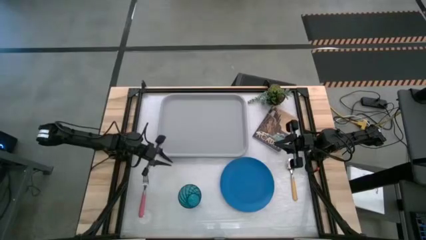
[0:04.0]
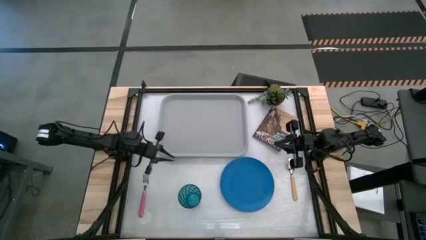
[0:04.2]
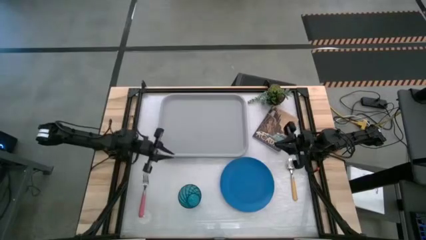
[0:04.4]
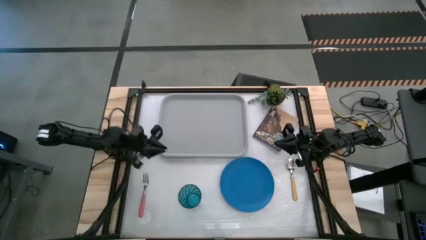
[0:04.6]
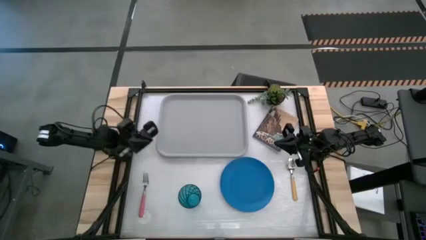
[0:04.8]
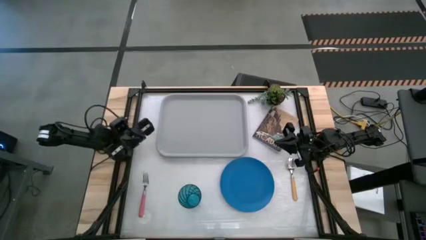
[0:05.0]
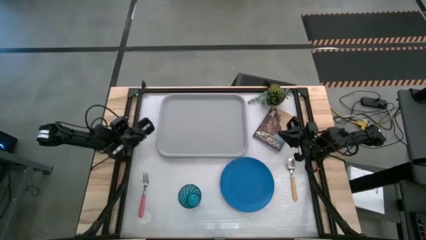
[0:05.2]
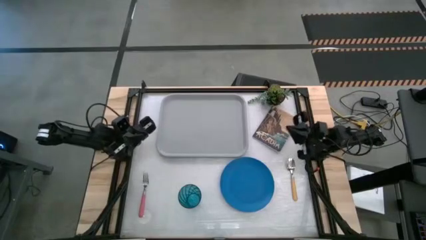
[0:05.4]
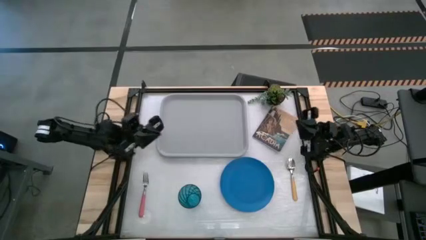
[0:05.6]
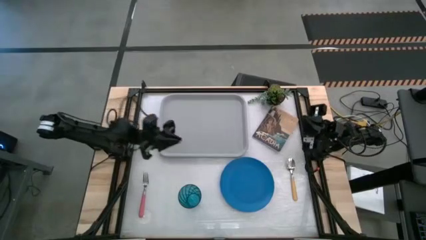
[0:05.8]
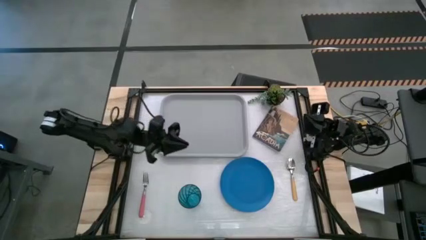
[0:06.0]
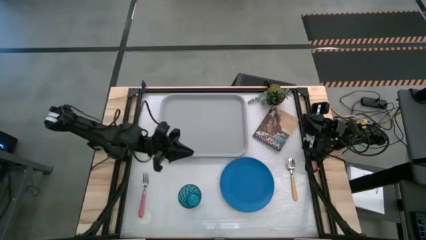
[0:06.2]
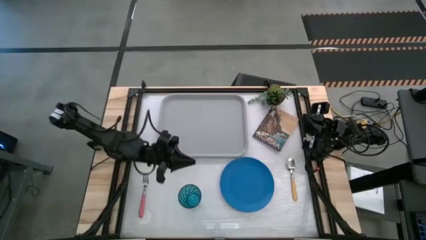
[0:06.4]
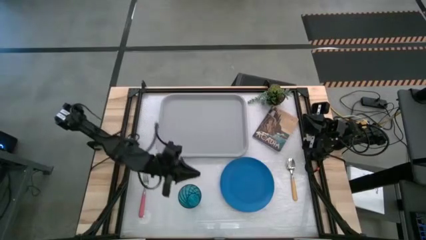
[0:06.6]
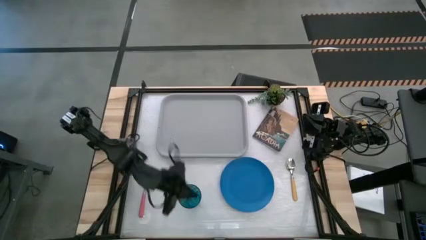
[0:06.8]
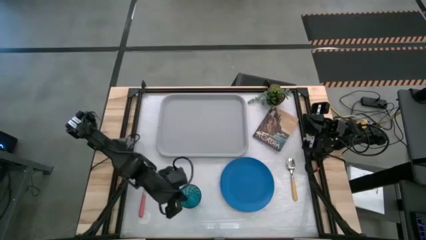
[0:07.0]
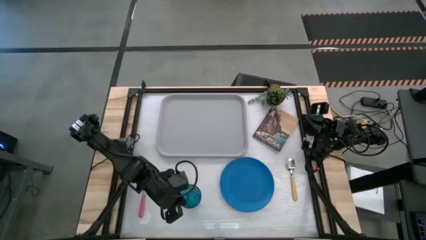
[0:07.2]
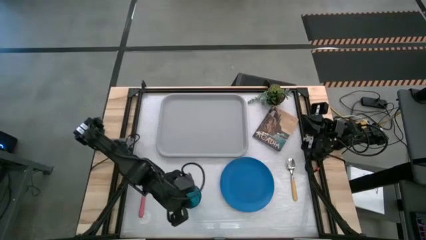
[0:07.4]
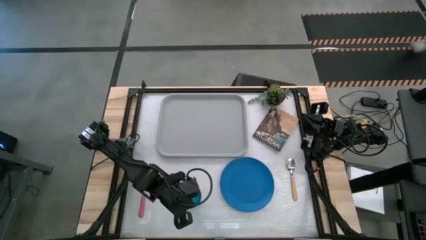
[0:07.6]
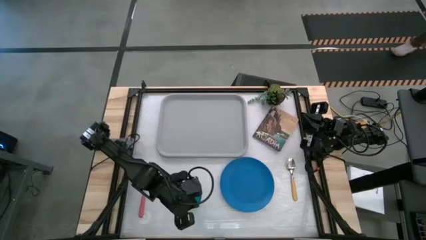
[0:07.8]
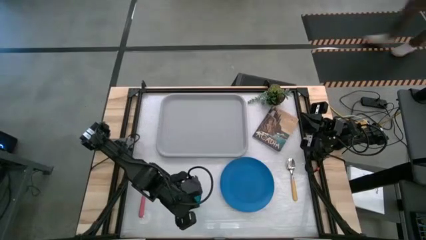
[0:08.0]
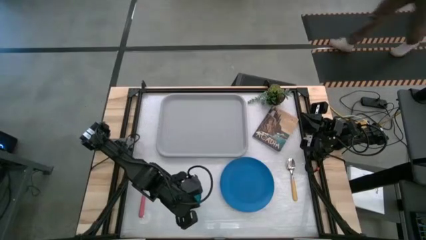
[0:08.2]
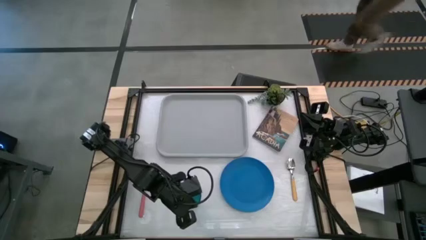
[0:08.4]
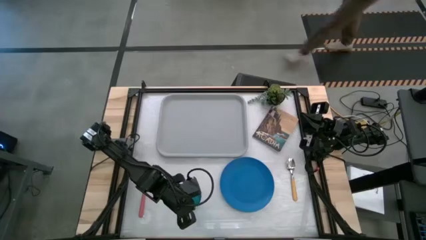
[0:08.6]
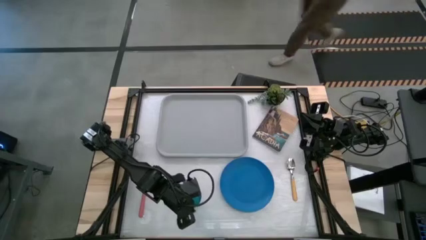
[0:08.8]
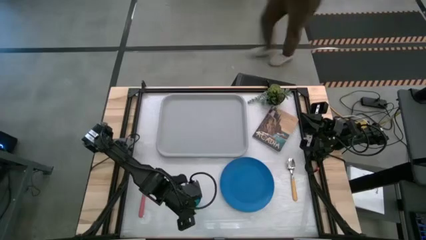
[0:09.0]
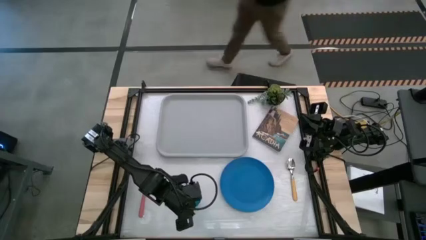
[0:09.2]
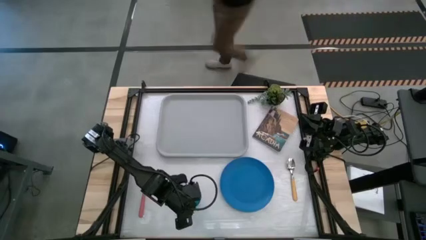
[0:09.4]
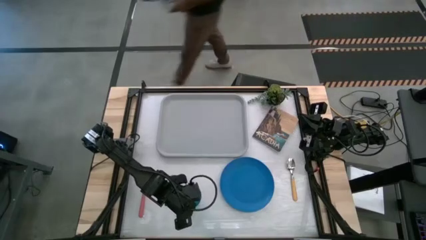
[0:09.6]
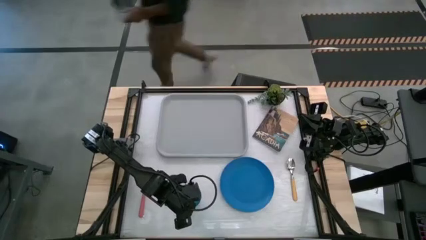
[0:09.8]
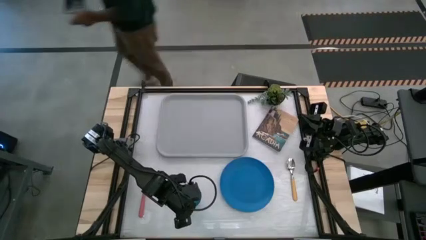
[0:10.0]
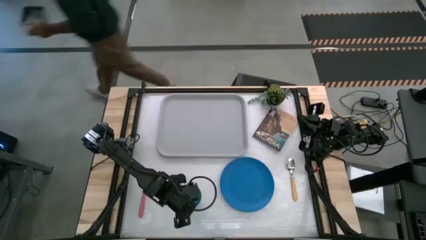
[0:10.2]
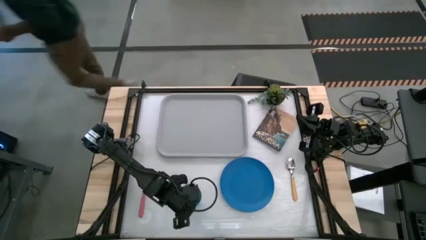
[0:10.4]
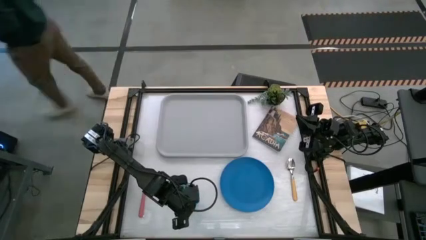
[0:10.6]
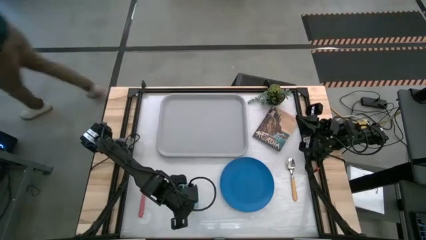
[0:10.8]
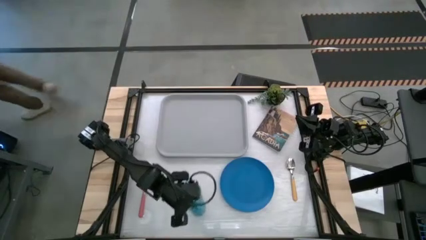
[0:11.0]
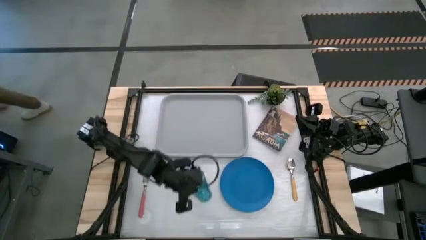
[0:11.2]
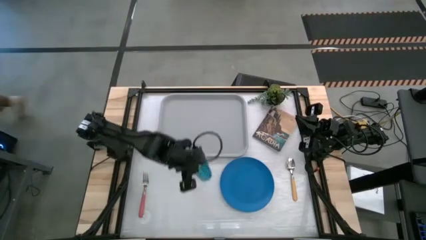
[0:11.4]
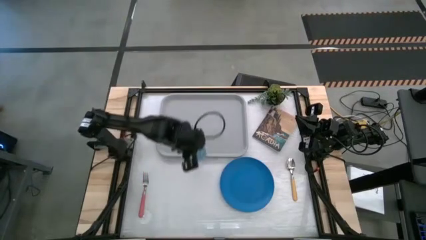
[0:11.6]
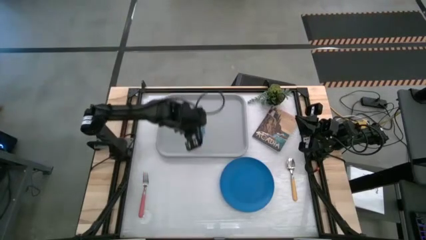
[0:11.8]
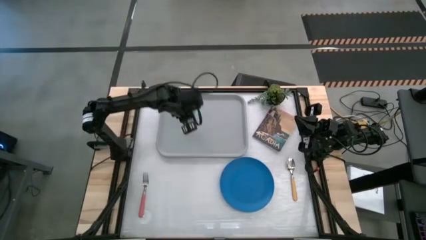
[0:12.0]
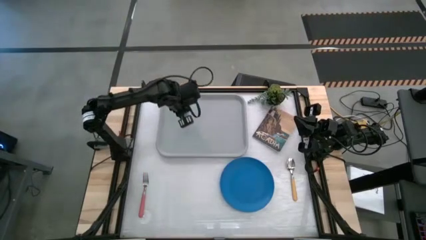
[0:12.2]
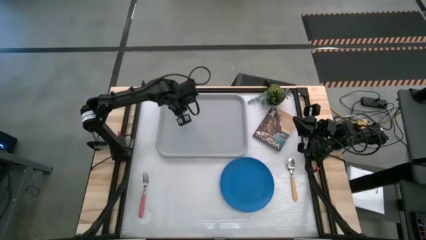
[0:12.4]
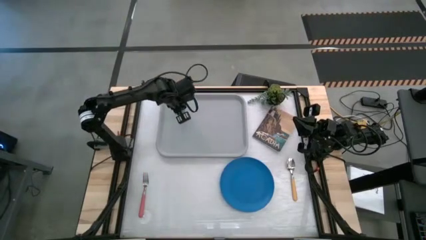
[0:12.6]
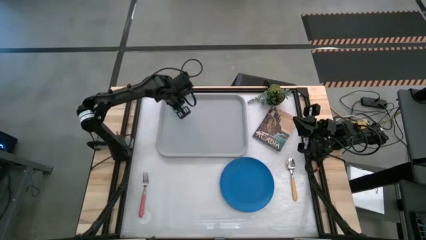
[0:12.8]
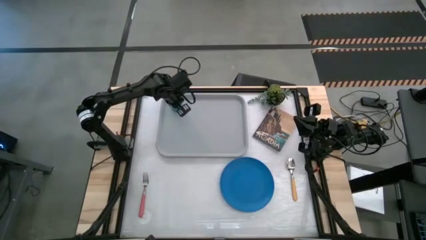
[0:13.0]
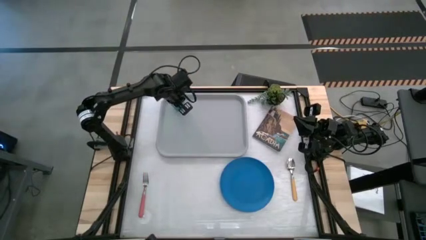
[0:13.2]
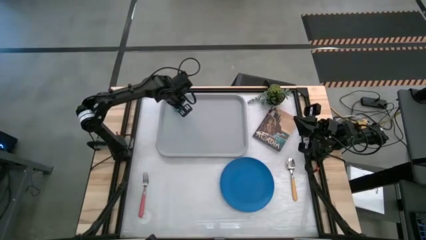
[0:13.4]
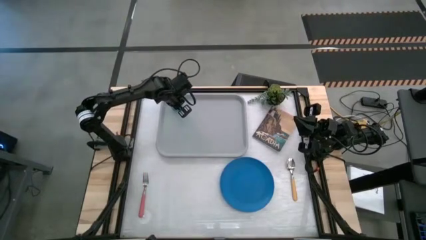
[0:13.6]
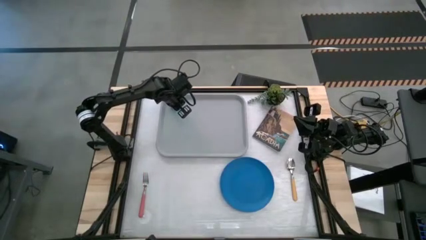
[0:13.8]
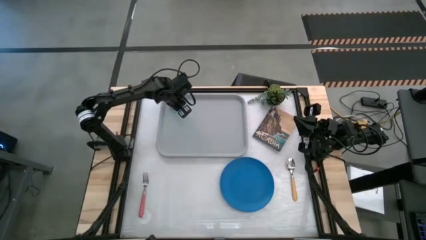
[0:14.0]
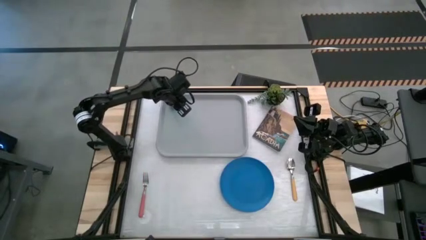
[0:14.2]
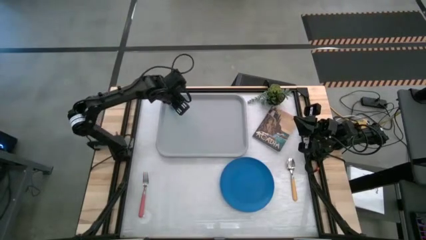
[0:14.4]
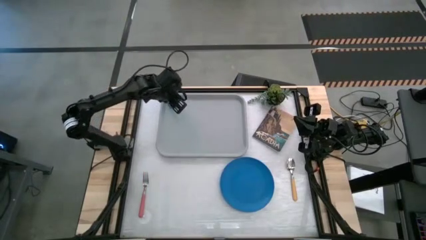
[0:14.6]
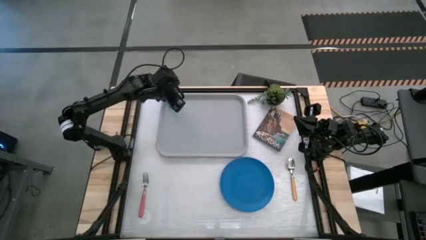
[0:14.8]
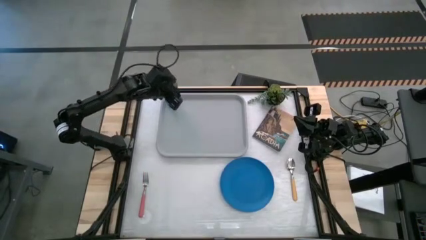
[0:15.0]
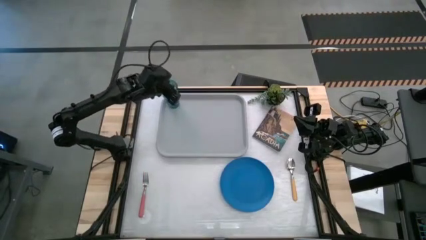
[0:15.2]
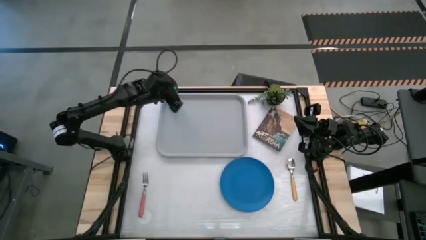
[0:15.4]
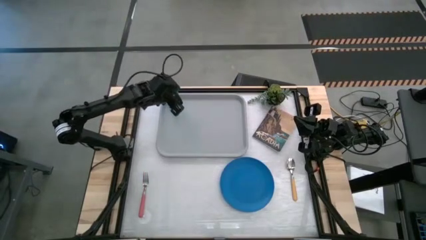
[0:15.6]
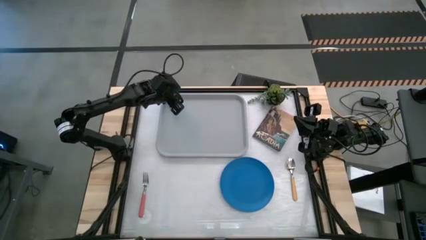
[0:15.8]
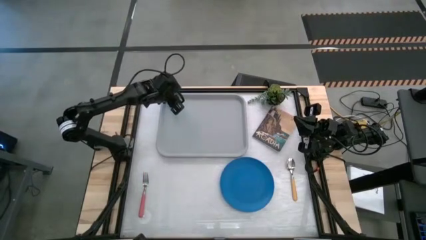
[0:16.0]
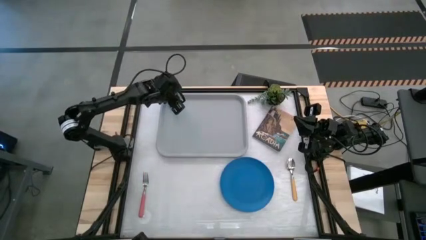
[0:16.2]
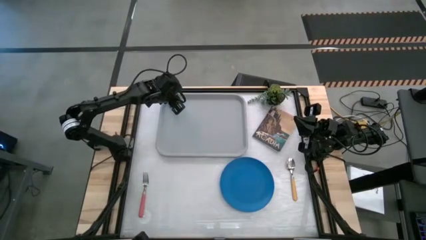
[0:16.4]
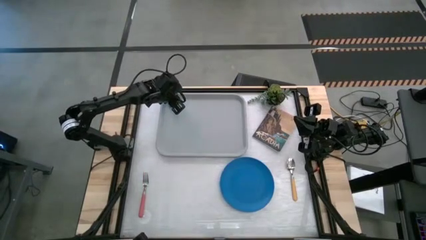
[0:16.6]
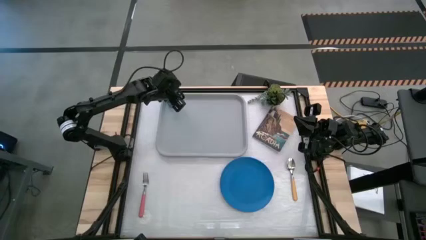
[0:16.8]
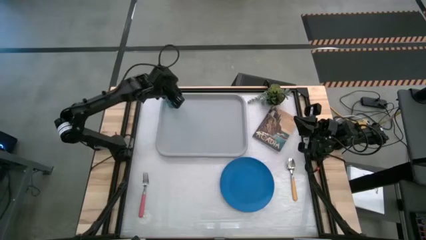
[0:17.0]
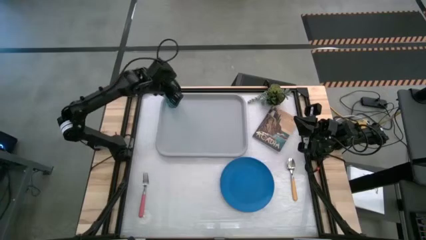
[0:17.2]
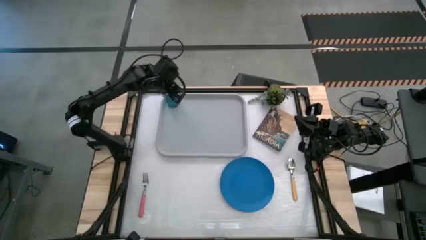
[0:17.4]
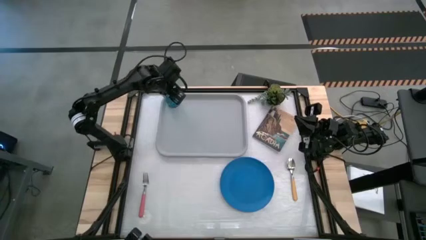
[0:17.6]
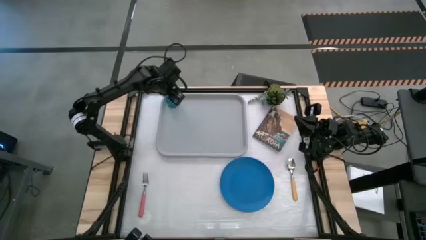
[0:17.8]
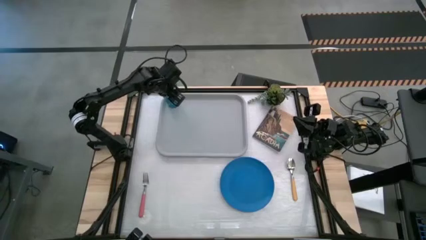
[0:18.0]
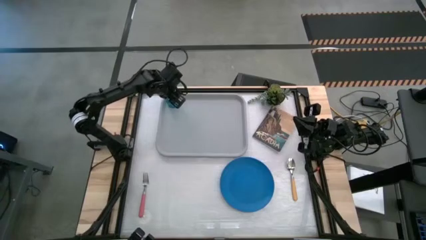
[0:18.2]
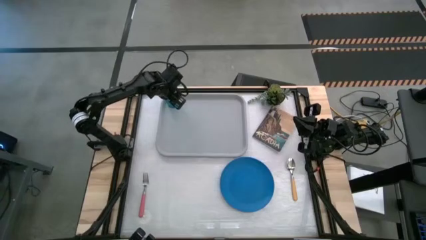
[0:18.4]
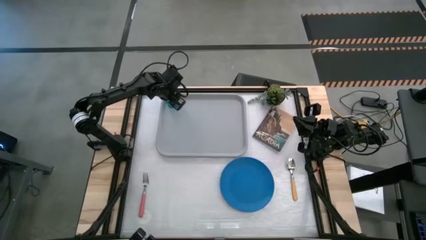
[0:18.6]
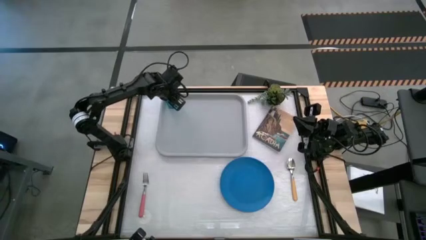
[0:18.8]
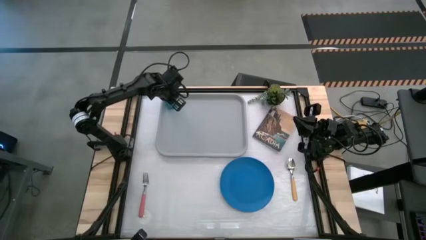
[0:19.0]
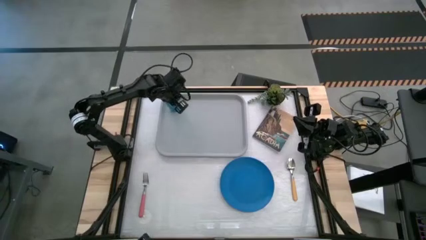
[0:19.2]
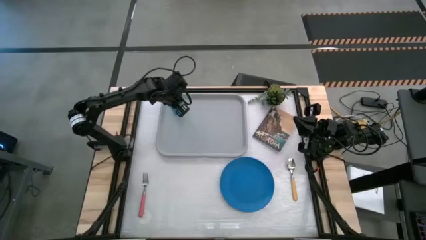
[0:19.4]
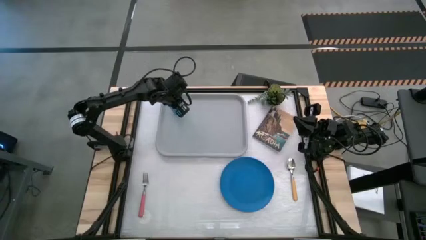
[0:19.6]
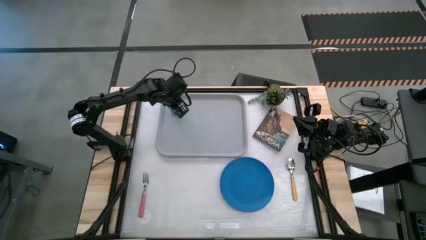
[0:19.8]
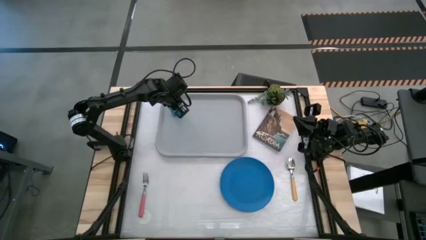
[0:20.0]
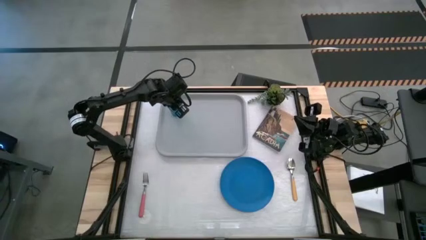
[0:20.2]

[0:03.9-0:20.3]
Task: Pick and place plate/cup/fork/spoon on tray
Put the blue cup on the top left side of the gray tray
